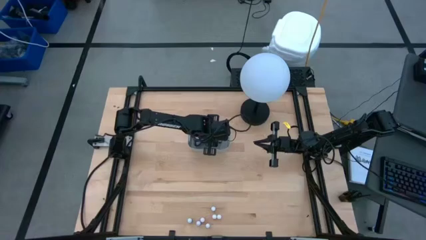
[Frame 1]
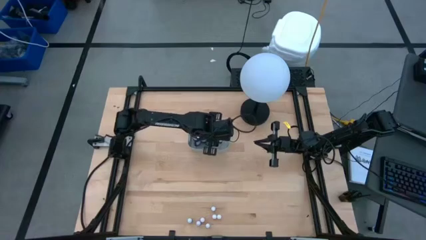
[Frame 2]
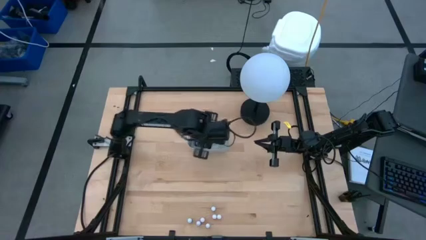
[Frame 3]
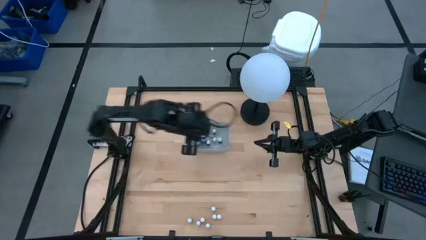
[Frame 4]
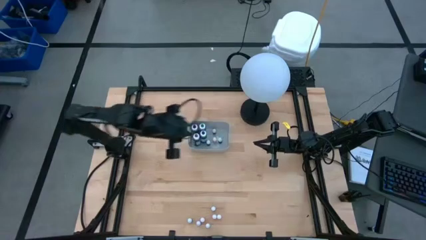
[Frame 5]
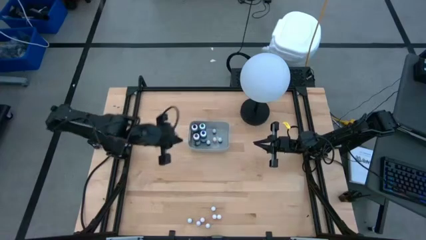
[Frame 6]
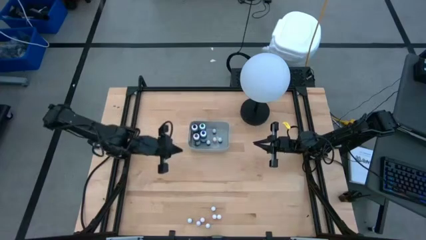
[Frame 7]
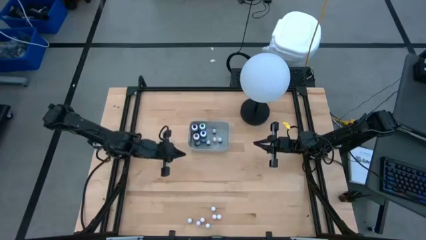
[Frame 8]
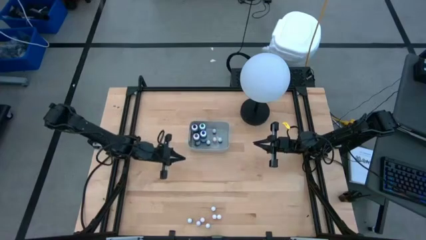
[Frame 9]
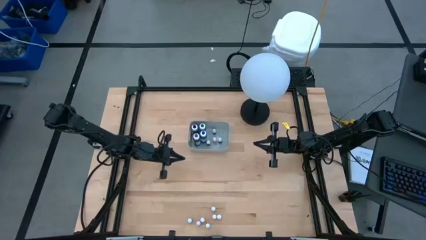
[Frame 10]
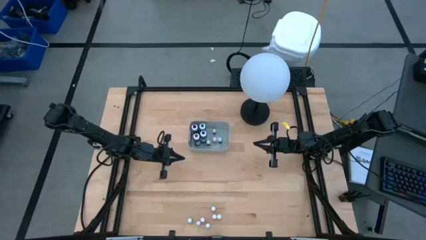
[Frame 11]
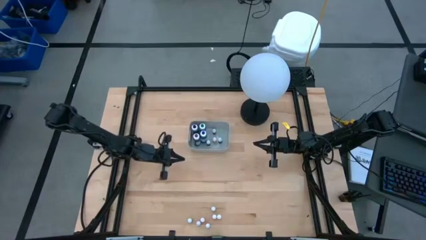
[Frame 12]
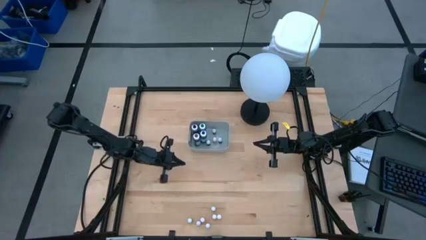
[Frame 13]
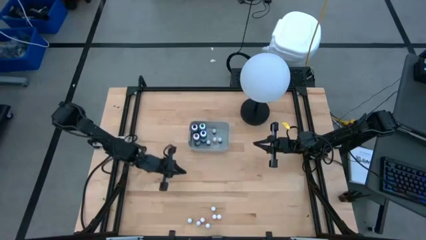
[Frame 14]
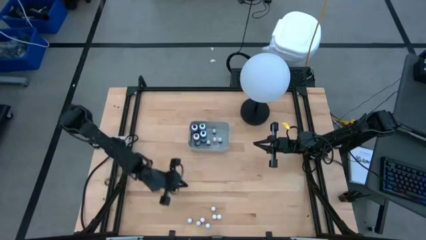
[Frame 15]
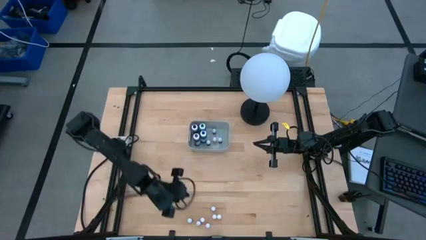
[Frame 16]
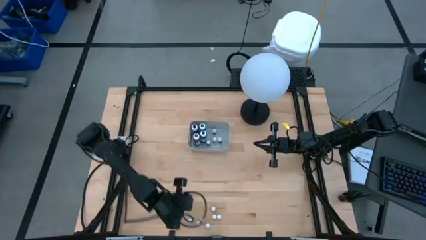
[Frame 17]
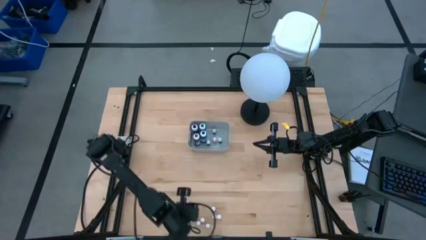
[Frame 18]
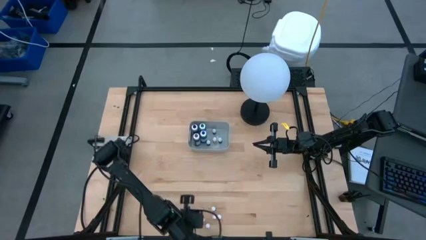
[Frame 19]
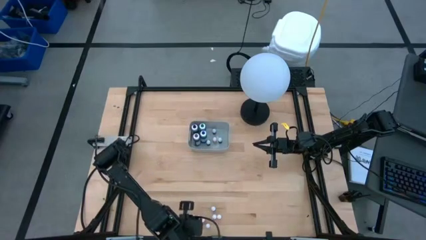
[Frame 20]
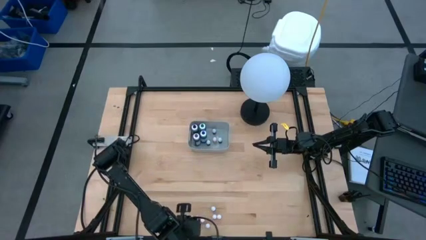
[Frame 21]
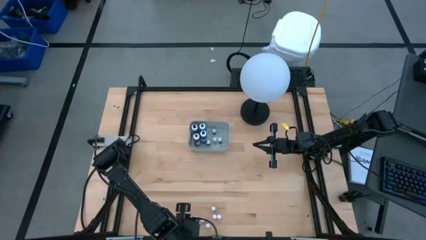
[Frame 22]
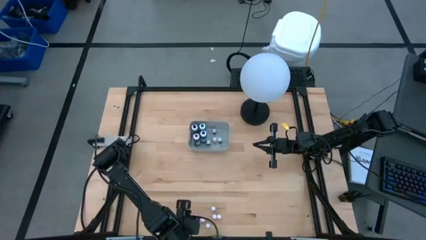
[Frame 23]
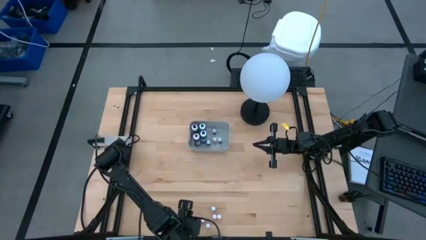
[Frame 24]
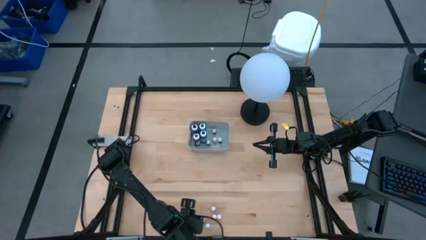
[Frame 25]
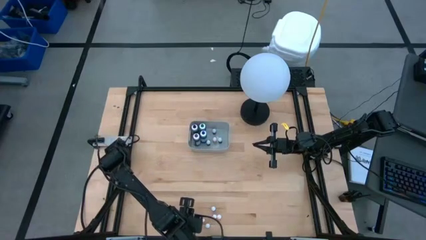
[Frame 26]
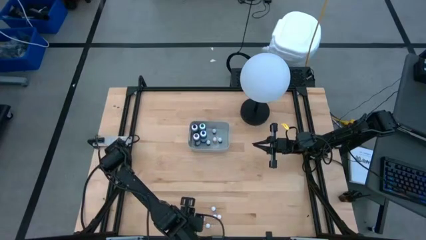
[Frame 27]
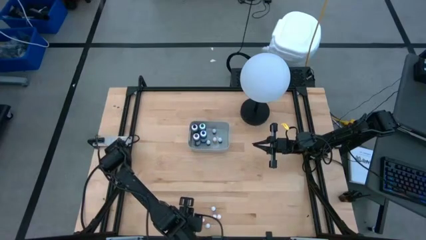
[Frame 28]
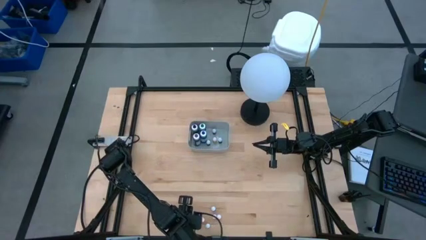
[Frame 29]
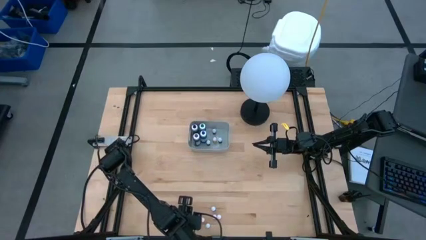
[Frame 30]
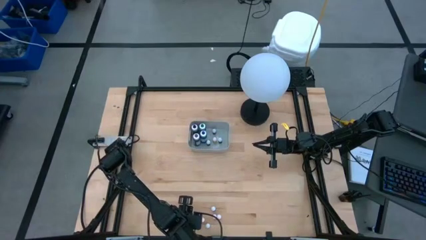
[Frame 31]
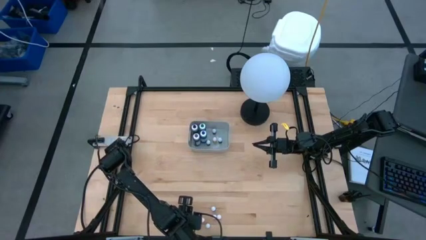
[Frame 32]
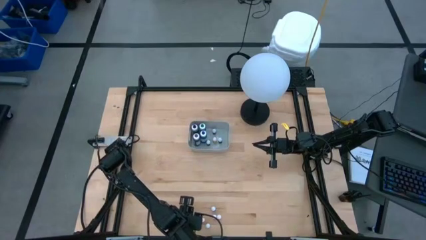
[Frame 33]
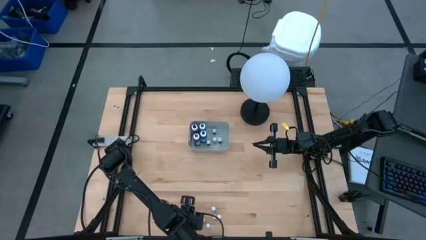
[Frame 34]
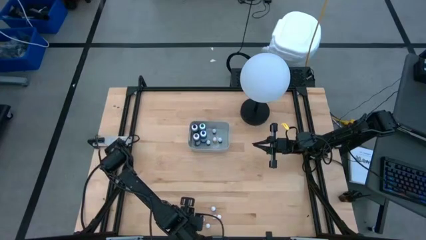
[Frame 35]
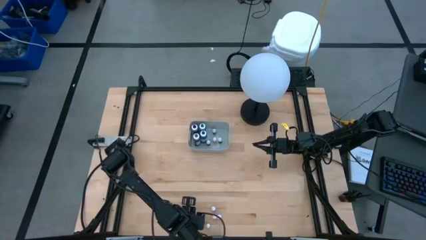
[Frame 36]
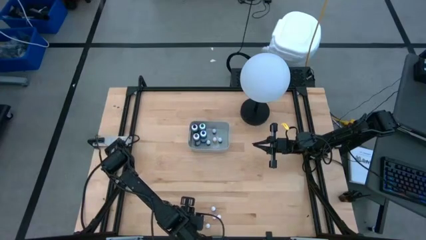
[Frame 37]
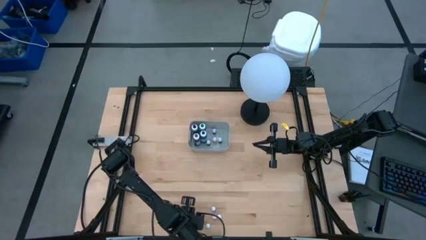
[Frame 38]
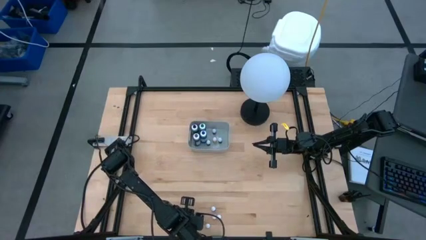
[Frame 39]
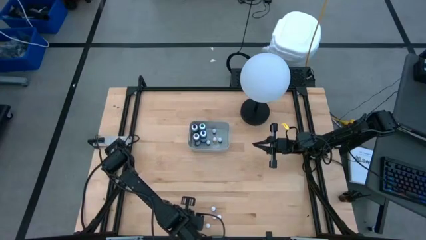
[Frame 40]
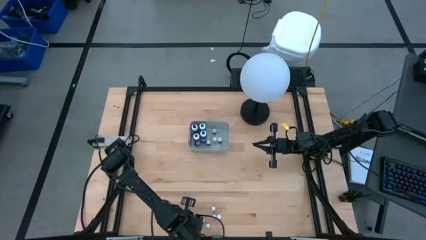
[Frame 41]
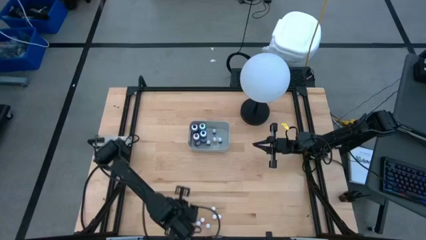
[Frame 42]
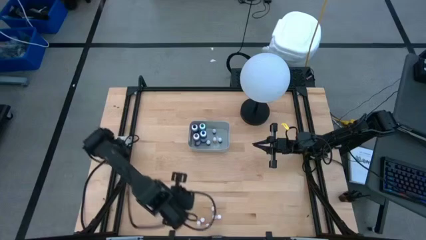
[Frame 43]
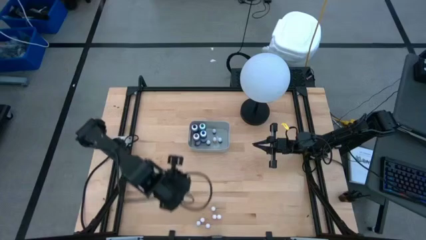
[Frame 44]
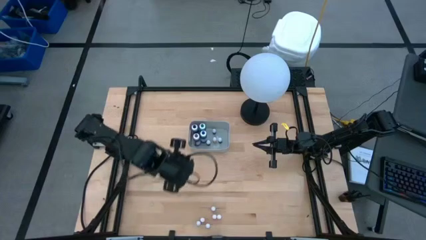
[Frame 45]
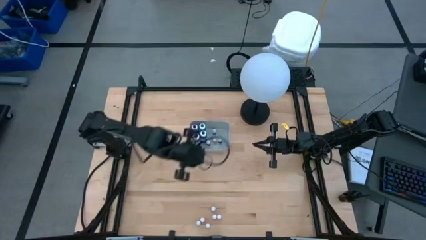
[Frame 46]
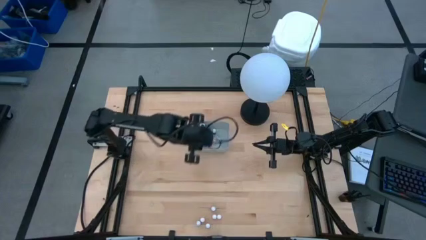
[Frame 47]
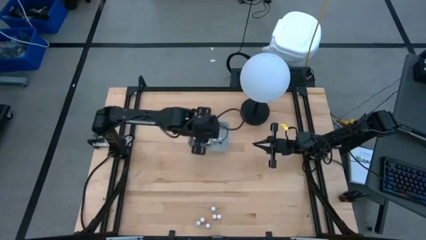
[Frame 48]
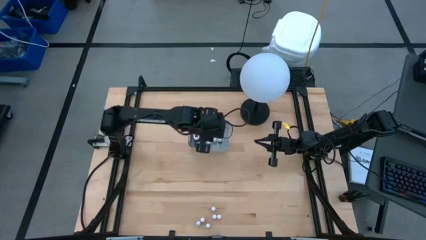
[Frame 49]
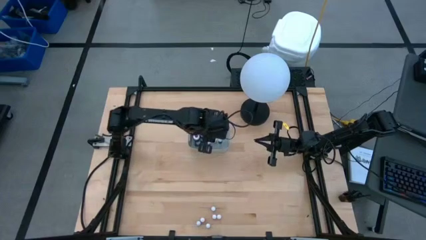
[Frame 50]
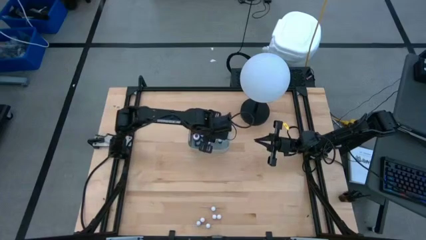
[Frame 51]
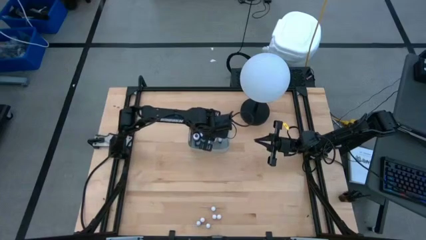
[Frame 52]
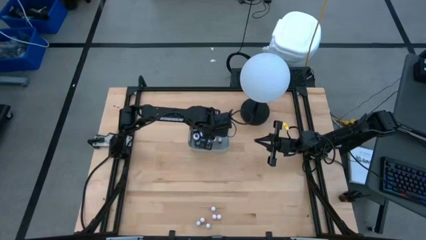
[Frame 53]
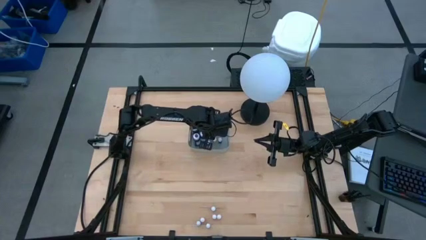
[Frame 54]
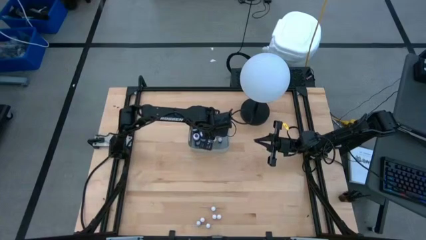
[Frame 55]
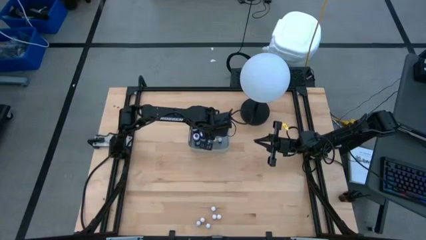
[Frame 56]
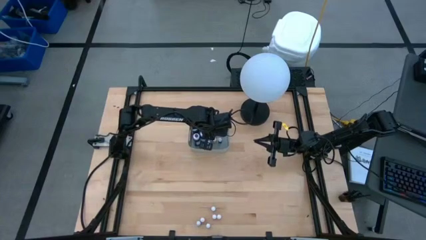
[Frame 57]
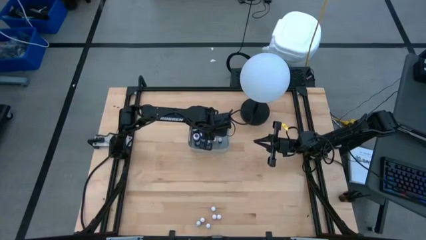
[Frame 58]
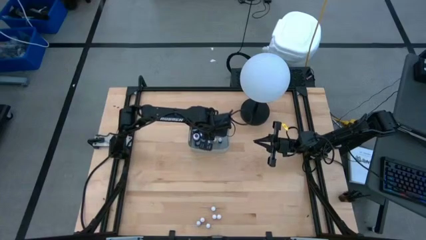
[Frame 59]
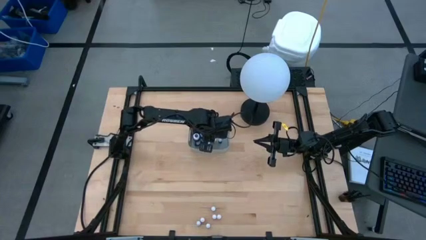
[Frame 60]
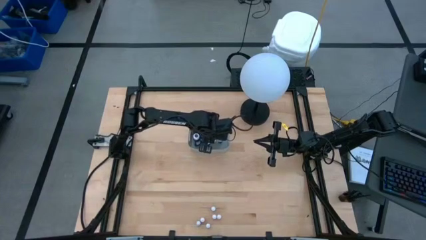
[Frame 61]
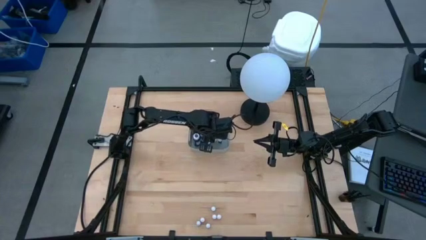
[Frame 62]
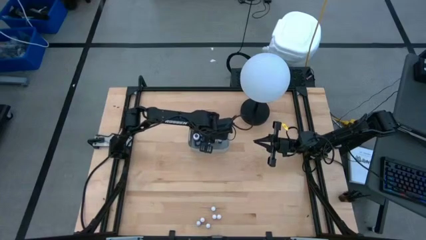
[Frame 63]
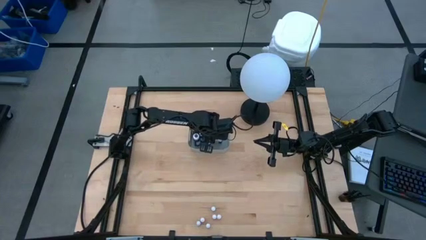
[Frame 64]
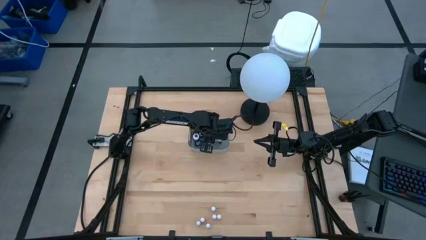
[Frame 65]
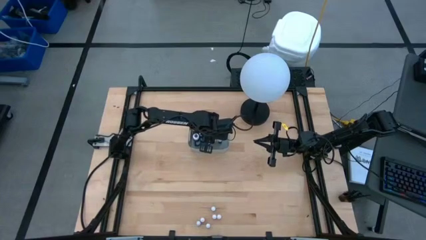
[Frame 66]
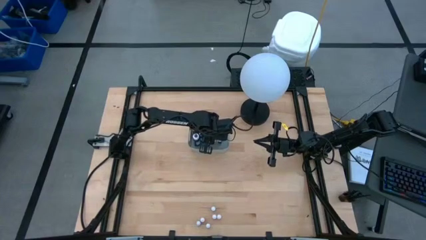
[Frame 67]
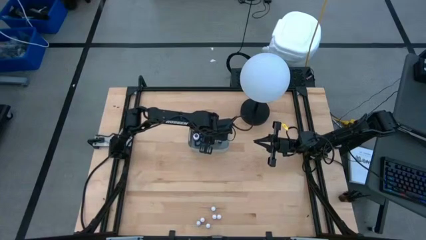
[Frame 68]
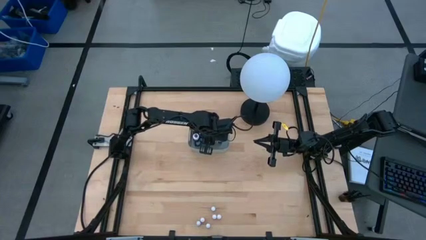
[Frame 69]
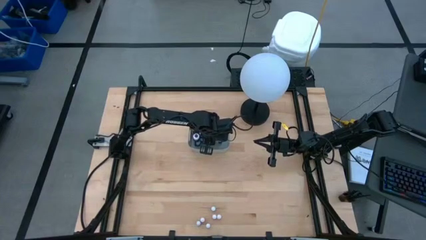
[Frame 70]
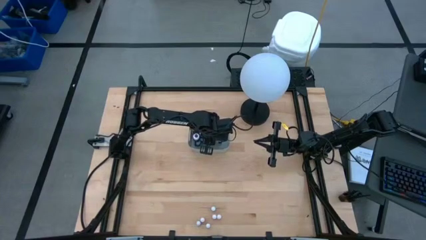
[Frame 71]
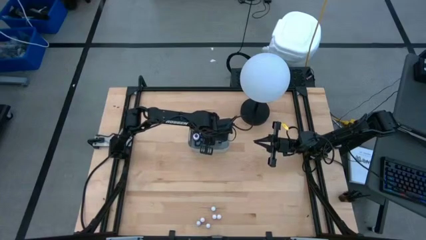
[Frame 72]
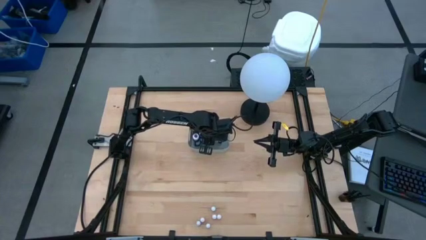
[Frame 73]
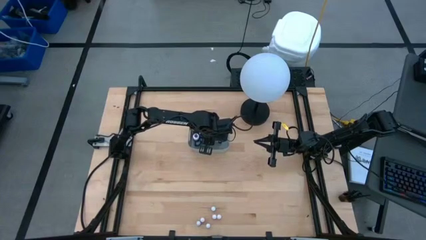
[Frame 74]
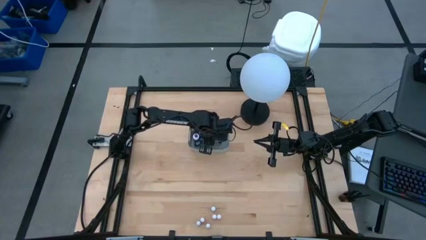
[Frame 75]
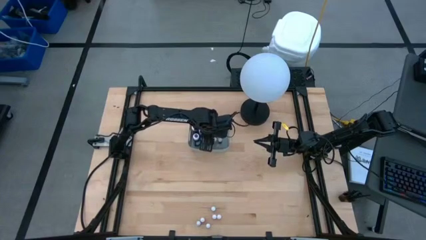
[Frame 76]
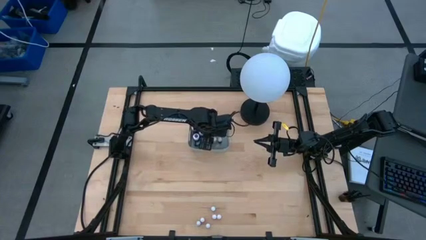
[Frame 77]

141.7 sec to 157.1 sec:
Task: Pick & Place food coloring
Put the small purple food coloring bottle into the gray bin
